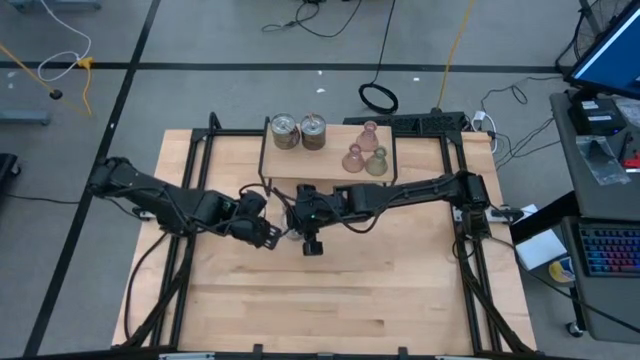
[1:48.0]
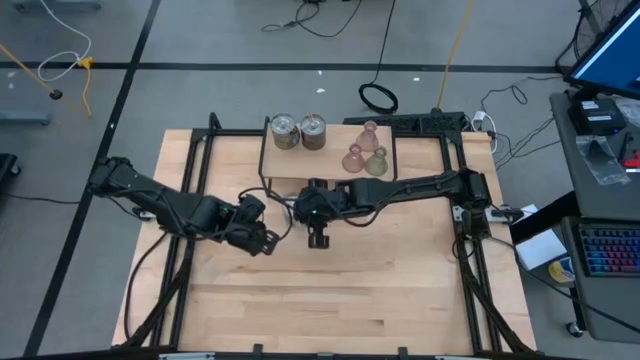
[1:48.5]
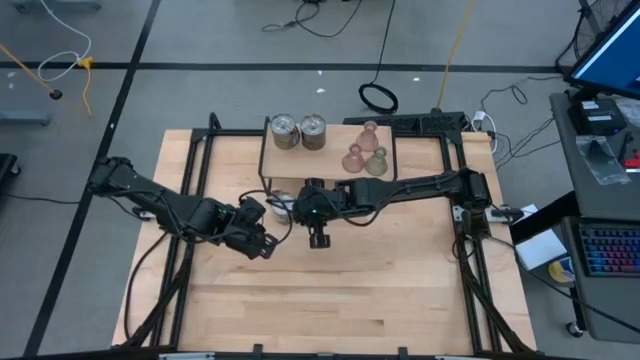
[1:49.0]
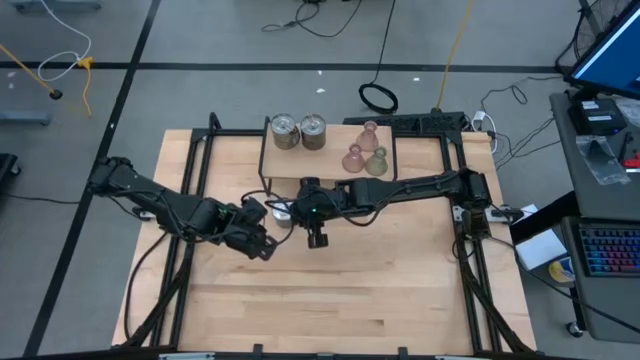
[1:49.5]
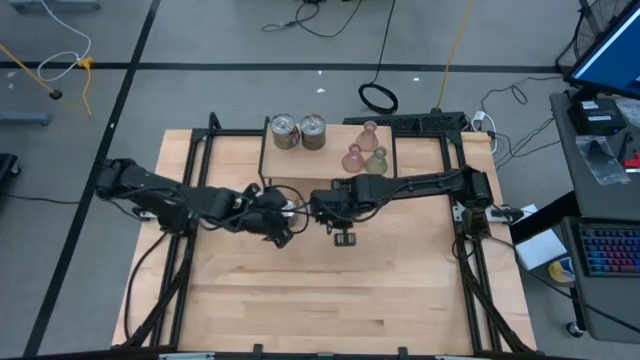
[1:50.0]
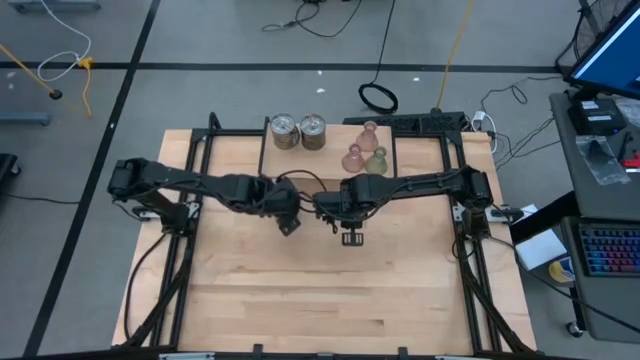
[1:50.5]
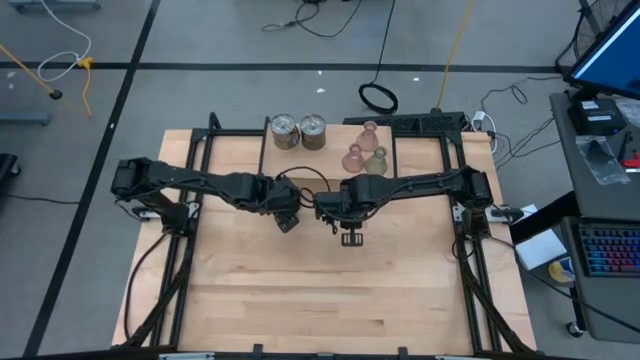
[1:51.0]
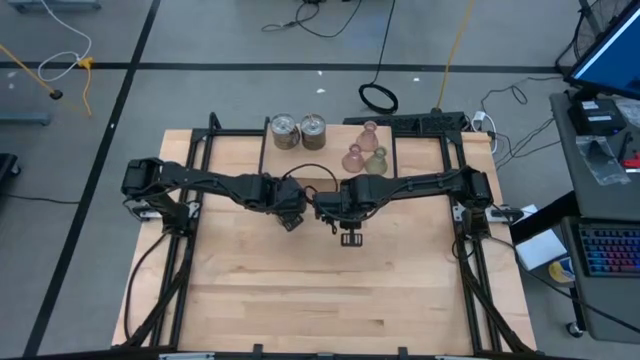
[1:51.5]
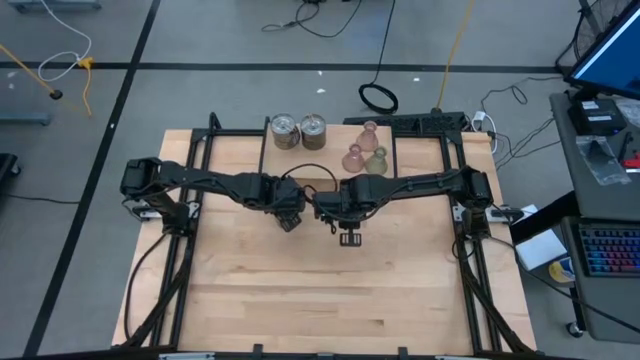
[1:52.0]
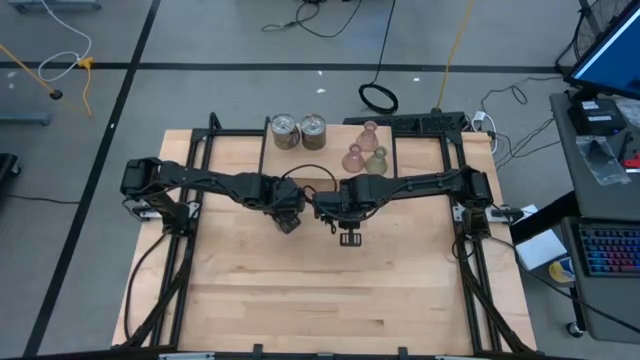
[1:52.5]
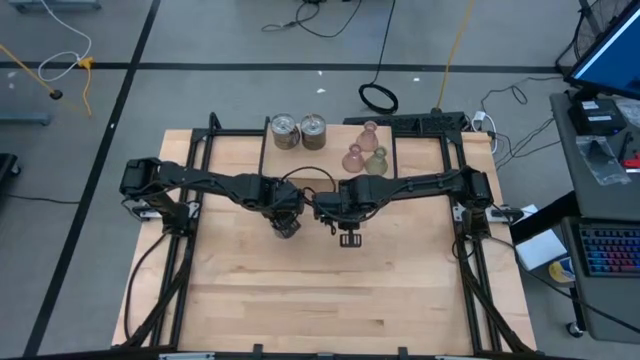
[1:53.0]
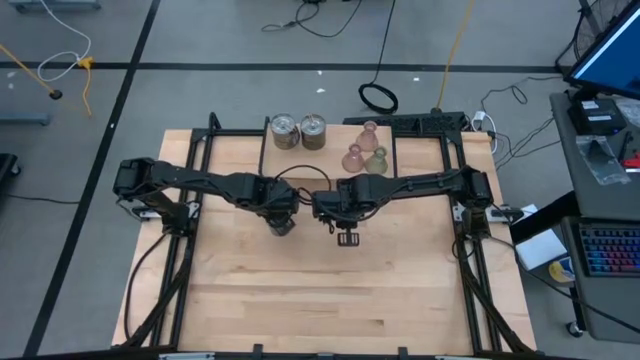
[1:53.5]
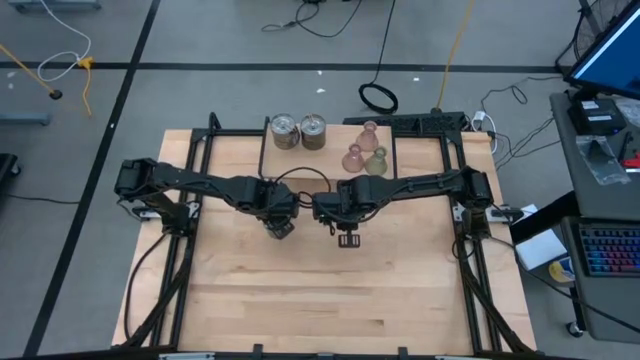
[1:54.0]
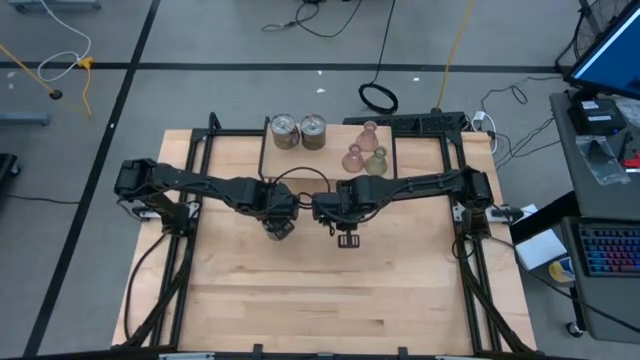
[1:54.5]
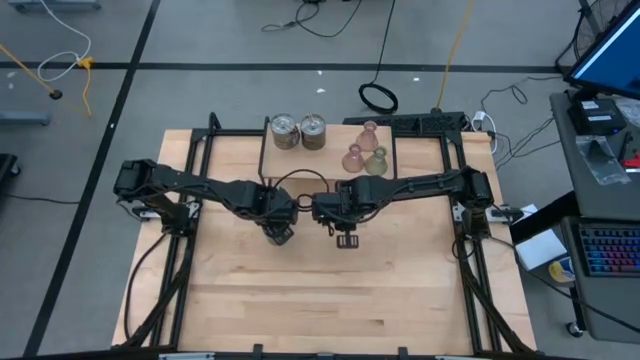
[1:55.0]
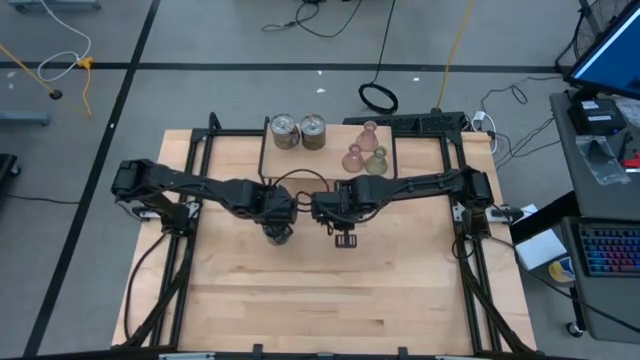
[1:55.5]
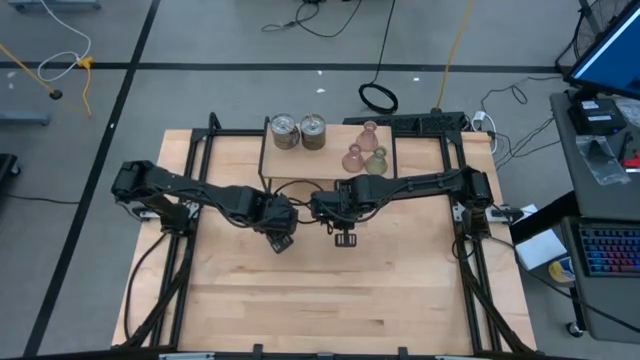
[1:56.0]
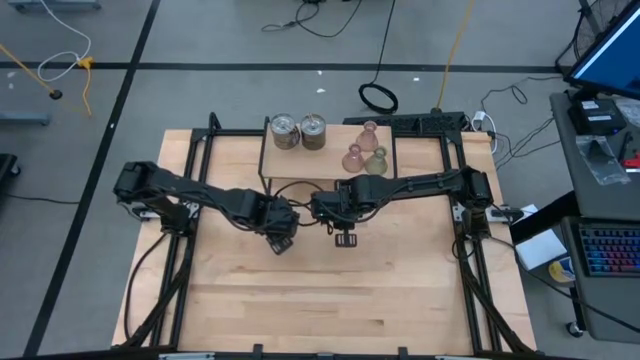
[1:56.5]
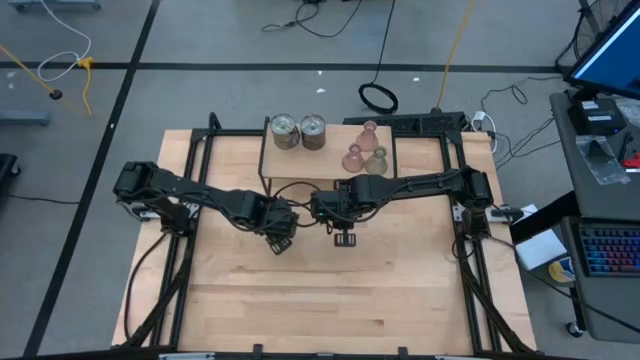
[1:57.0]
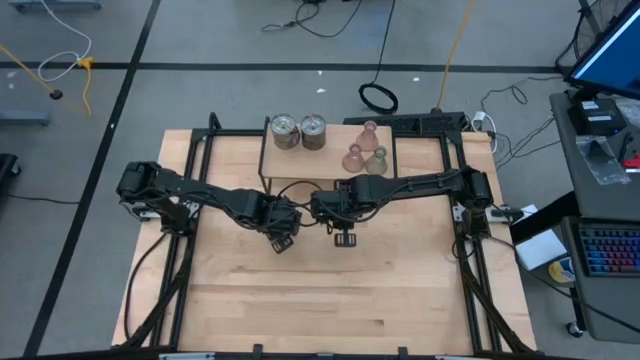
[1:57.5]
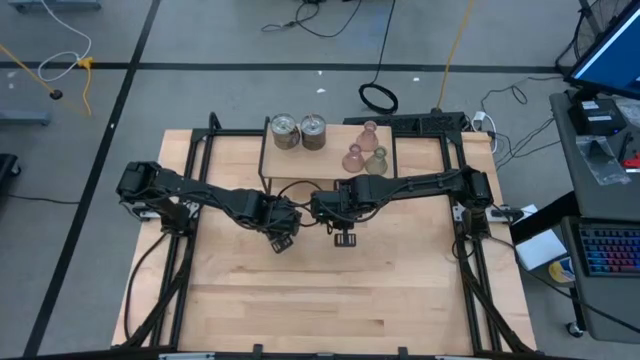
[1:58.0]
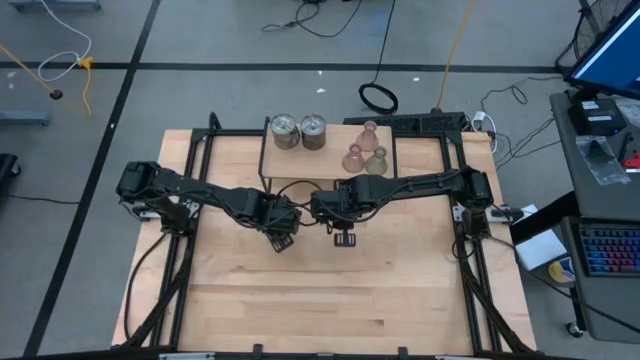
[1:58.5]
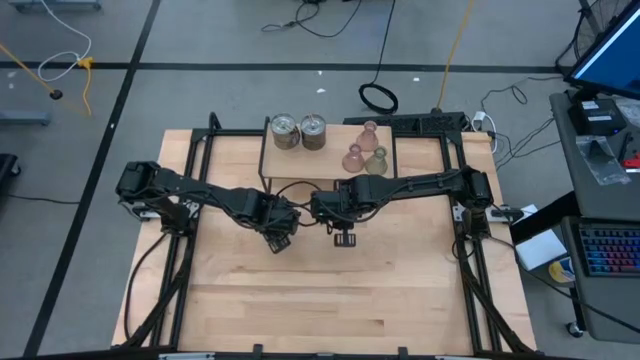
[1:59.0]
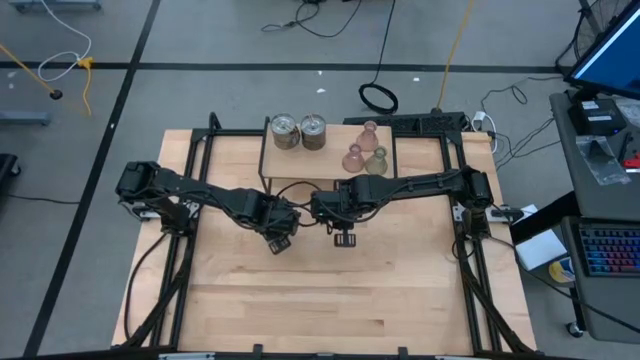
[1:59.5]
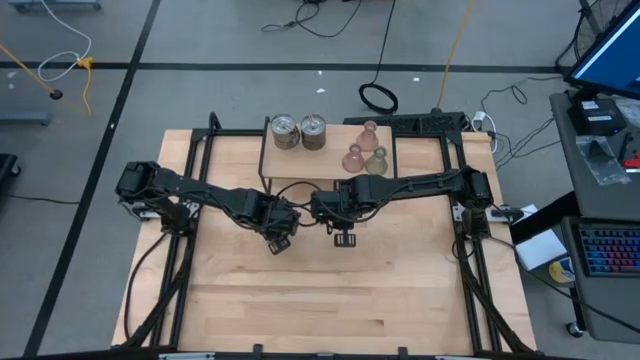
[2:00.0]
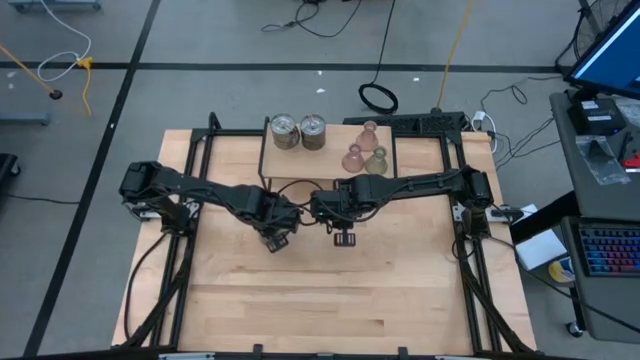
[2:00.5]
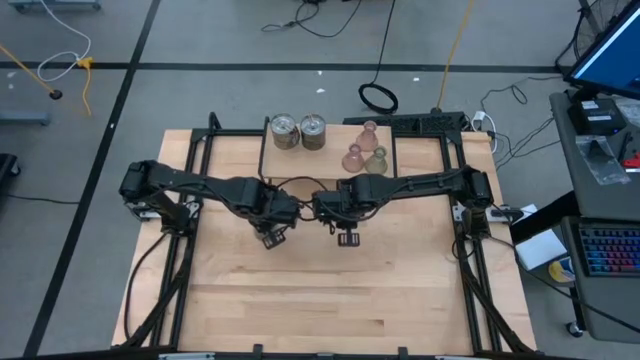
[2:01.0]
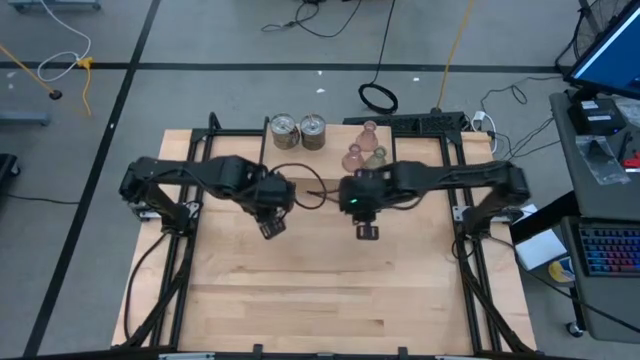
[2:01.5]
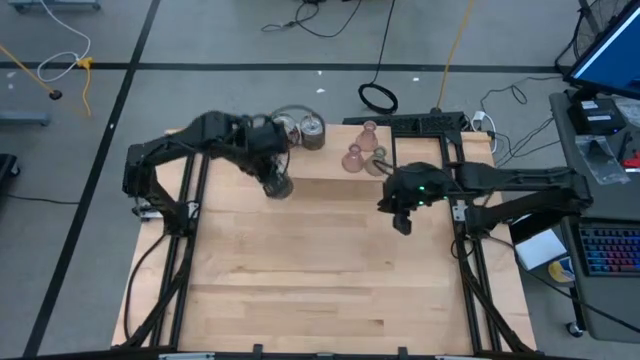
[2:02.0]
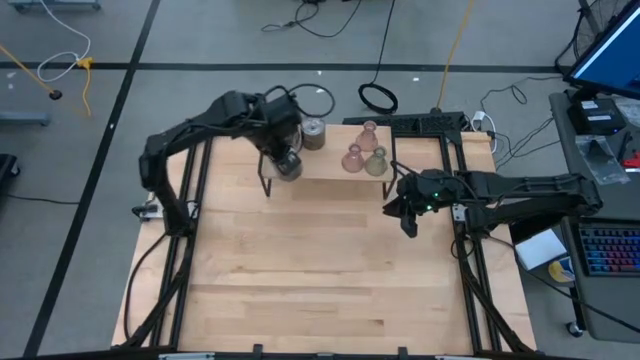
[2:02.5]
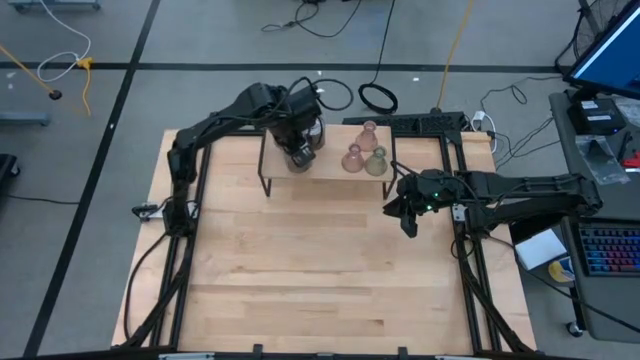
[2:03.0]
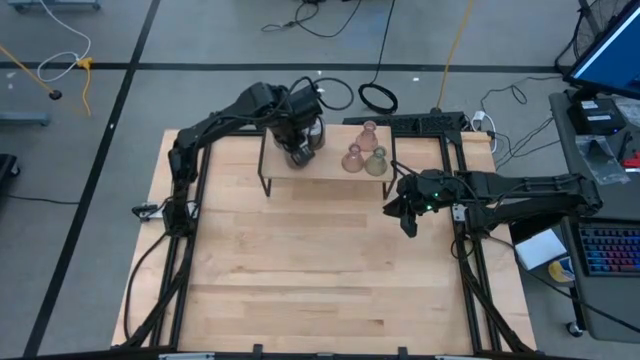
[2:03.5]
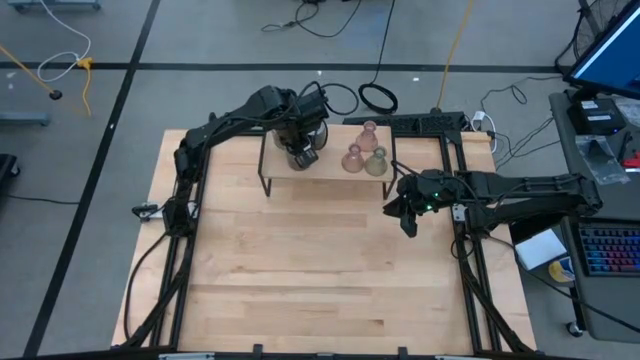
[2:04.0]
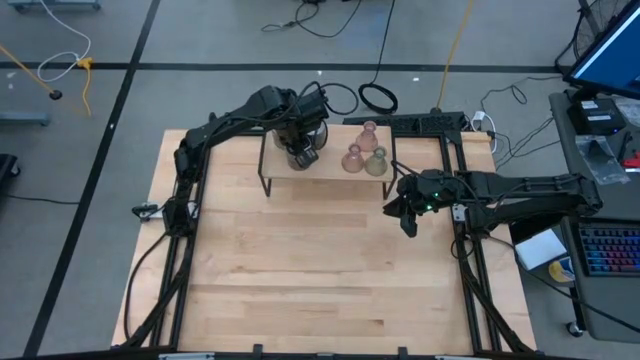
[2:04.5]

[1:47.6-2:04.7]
Task: Pick & Place candle stick holders
Put the scented candle on the shelf

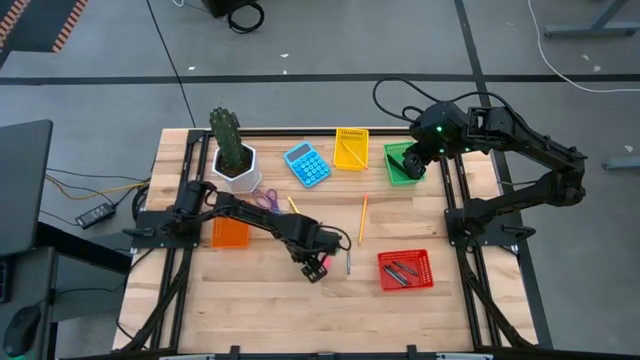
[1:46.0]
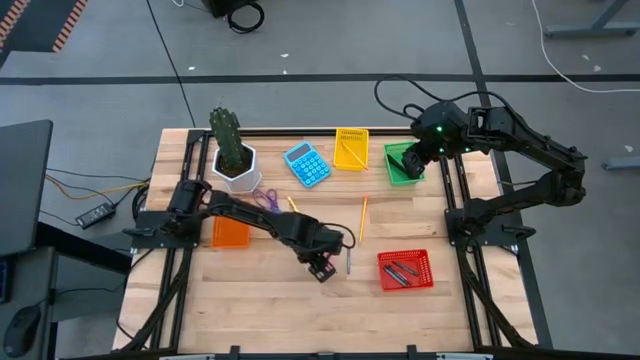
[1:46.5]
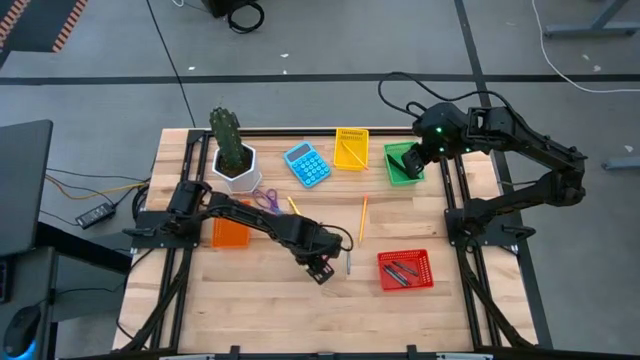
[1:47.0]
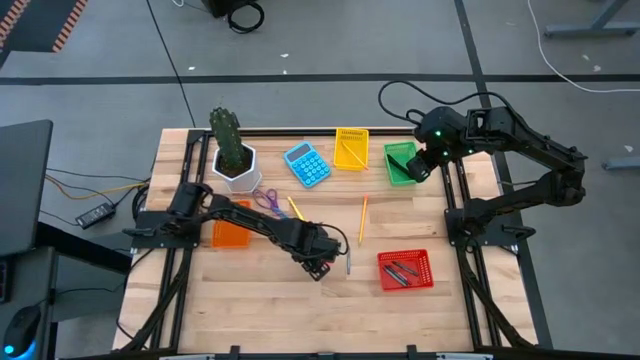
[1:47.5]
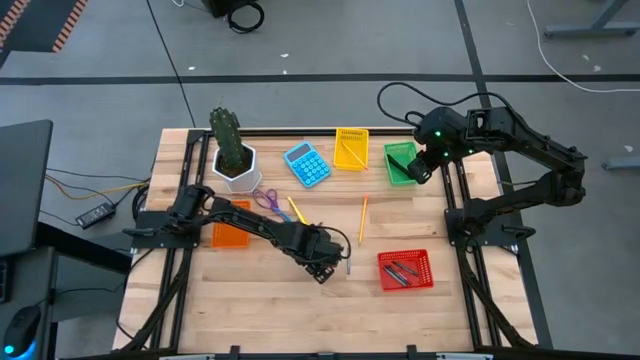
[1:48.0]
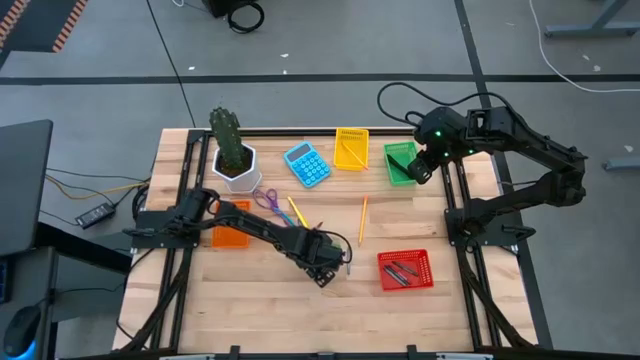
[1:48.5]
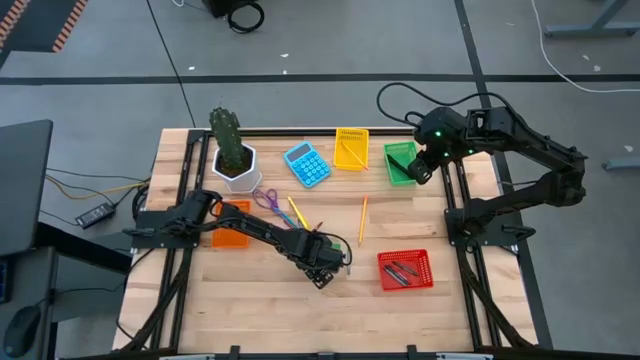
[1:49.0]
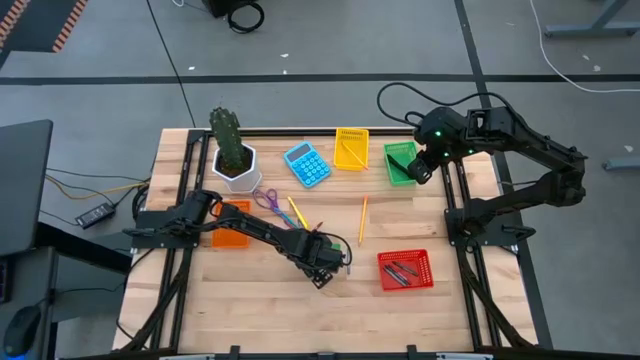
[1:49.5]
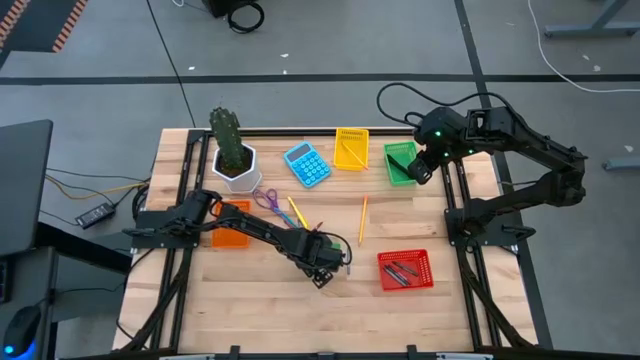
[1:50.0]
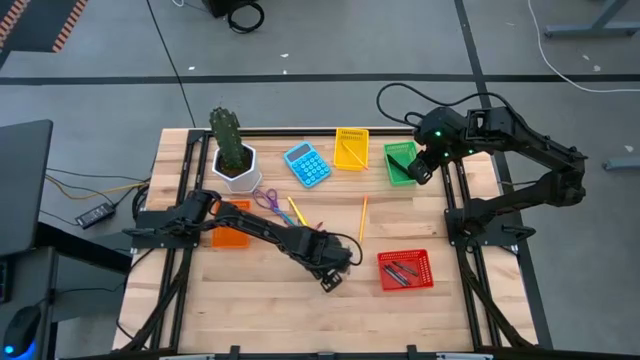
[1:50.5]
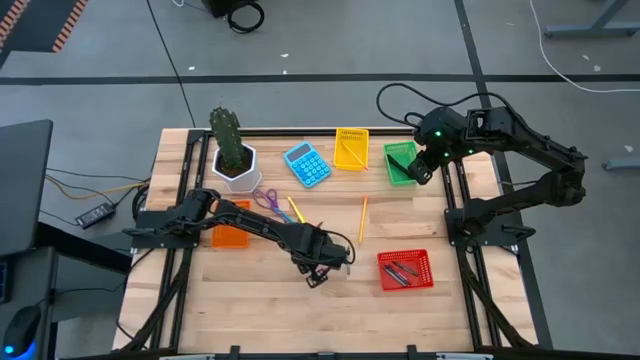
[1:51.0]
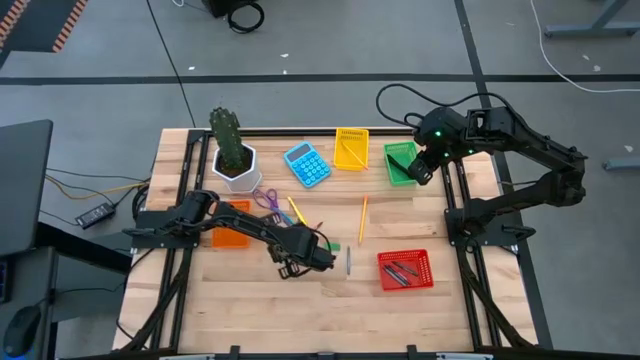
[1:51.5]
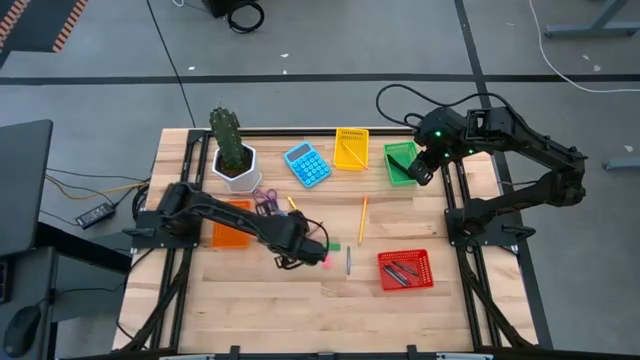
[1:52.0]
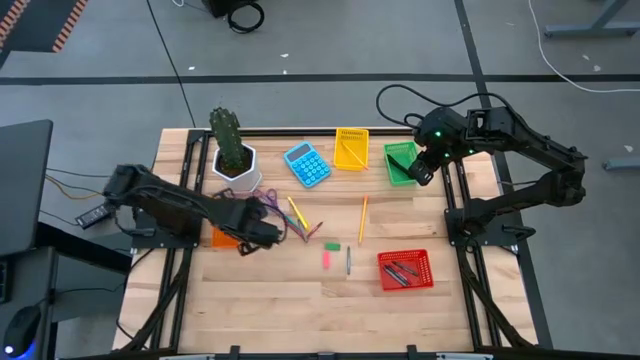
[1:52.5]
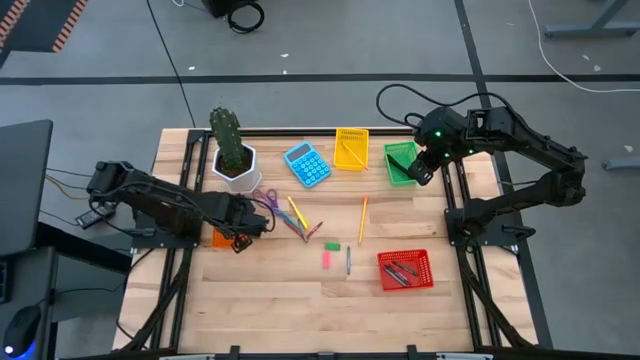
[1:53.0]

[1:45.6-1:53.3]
Task: Sort crayons/erasers/pens/pencils in bins
Put the yellow eraser into the orange bin
